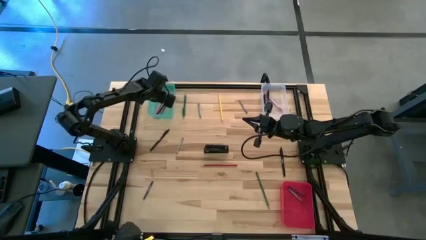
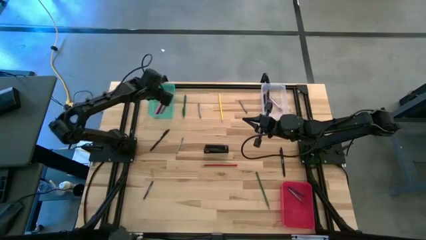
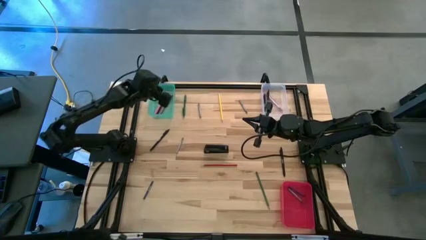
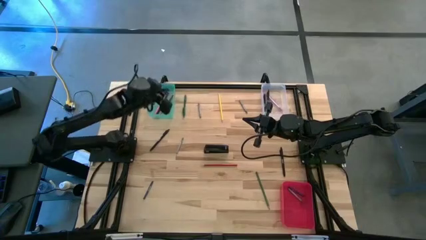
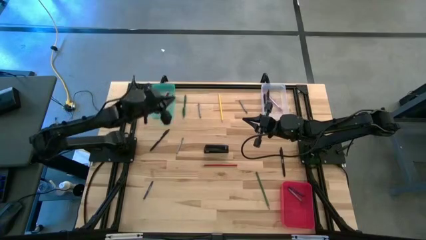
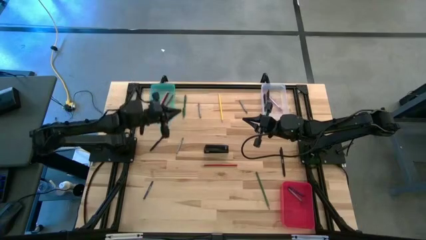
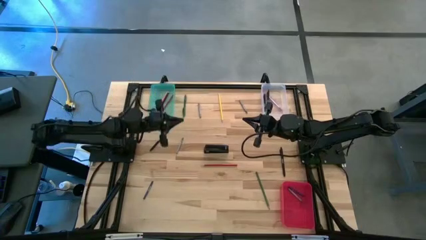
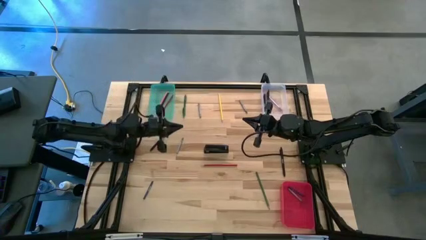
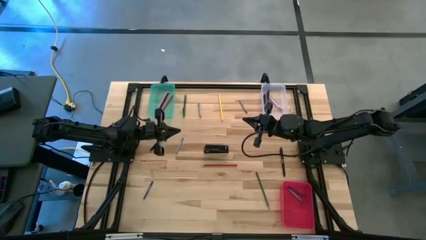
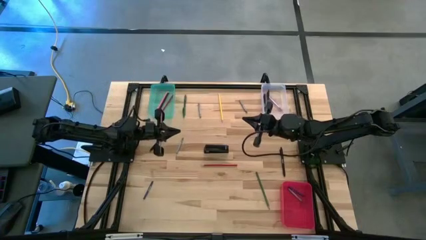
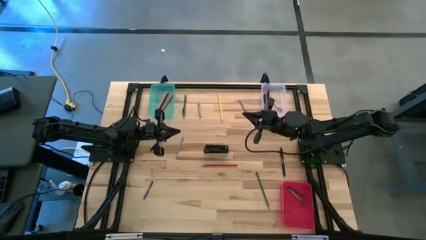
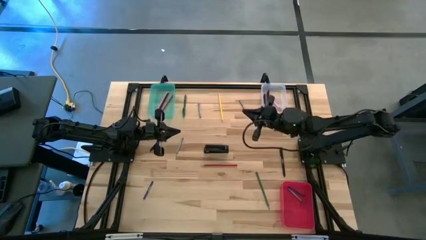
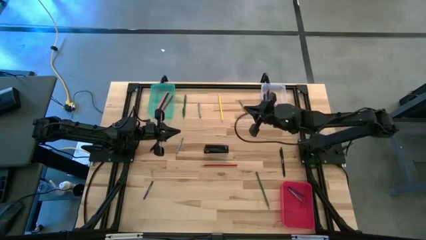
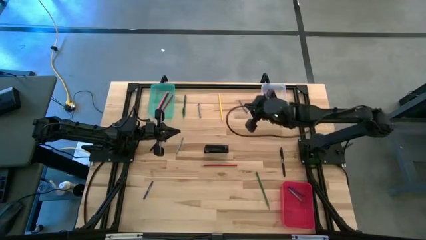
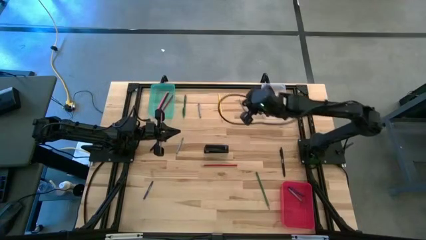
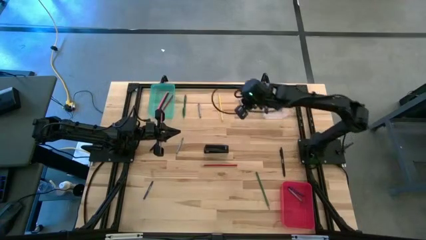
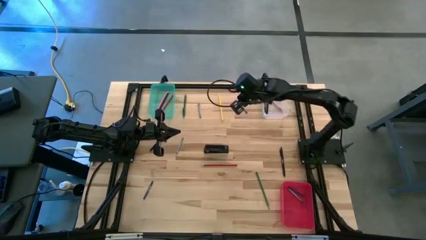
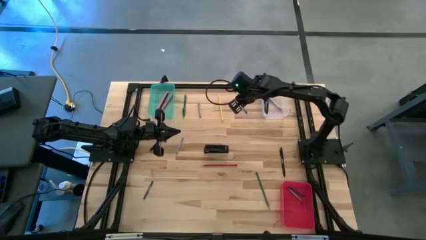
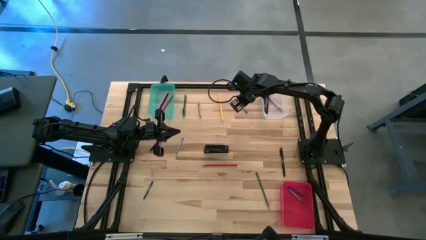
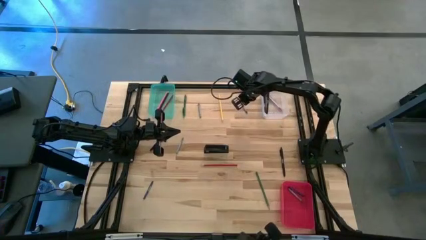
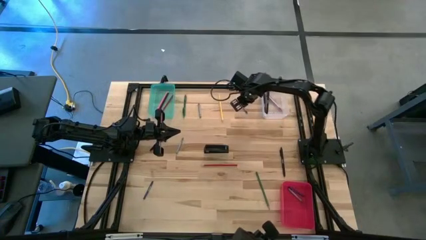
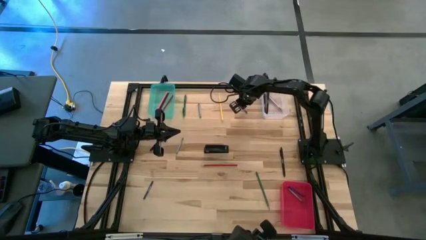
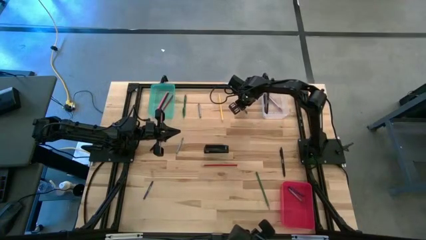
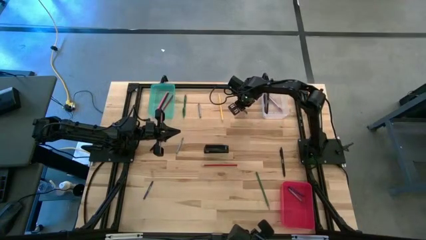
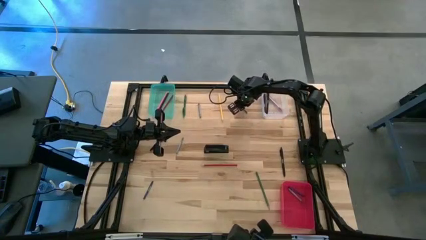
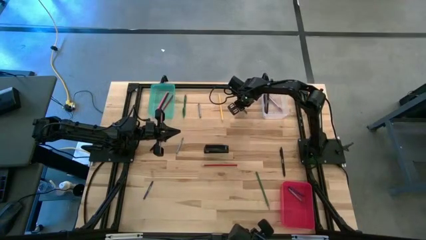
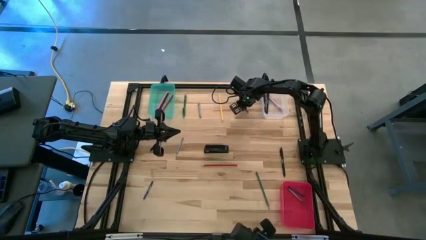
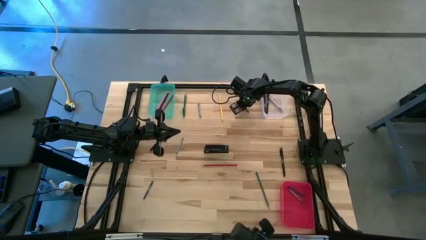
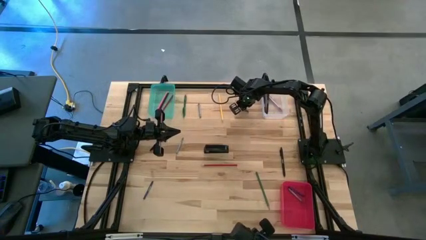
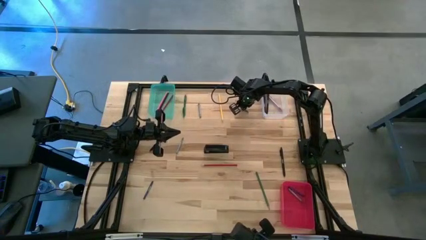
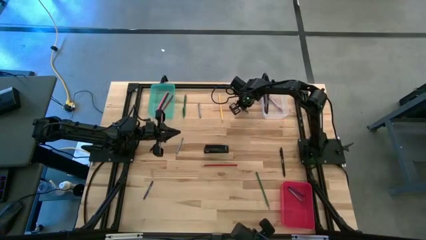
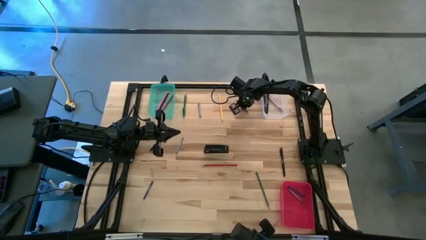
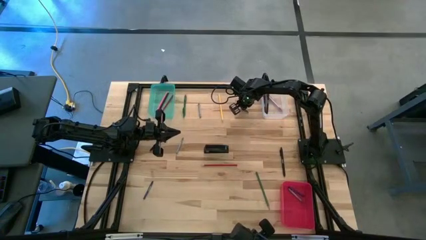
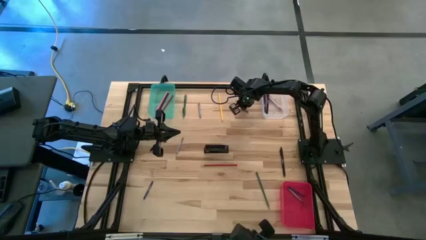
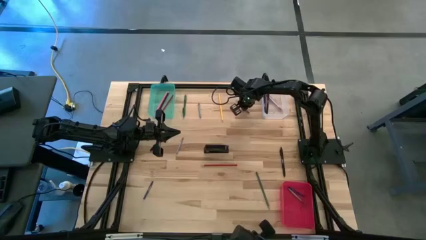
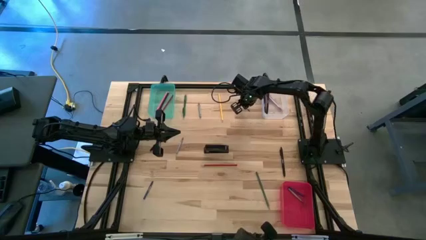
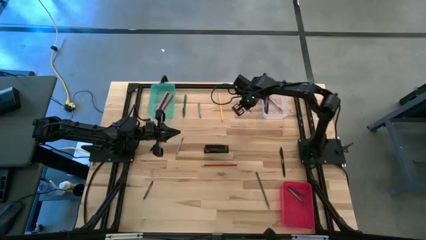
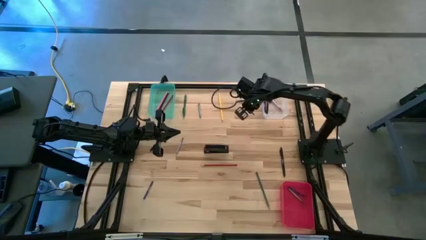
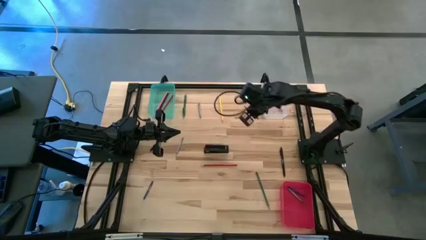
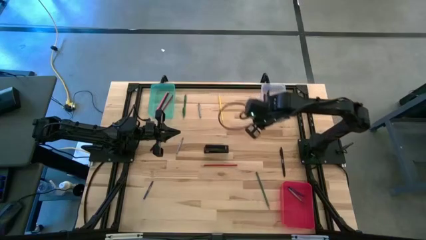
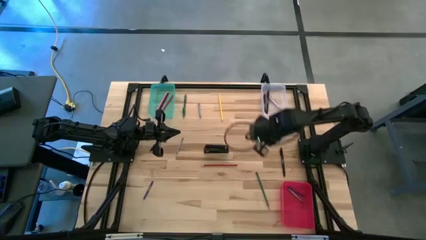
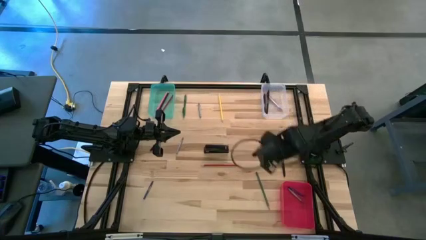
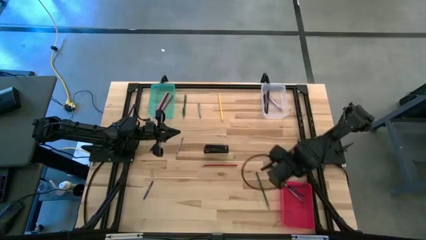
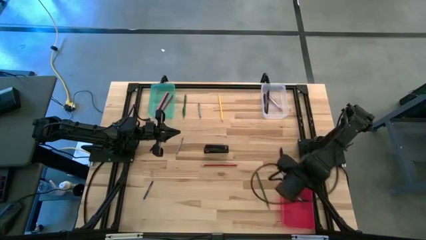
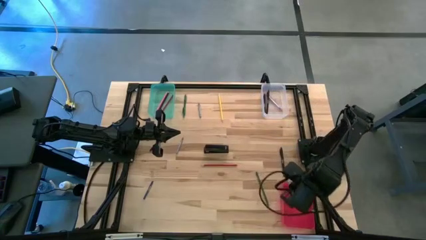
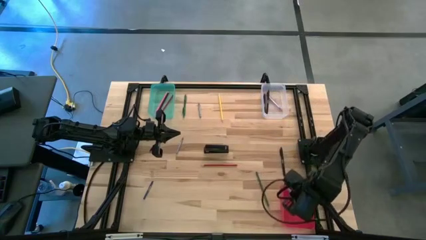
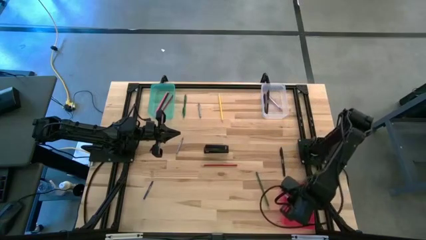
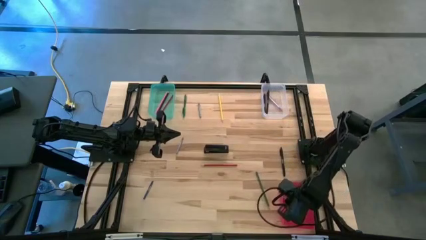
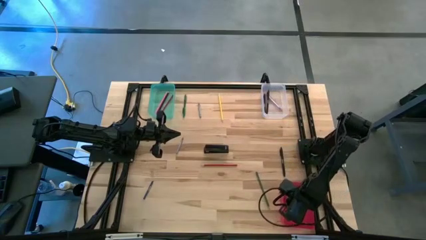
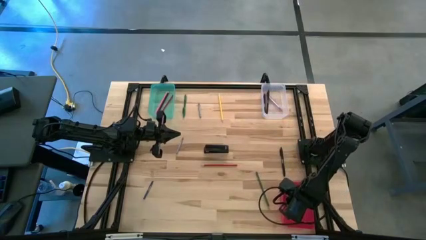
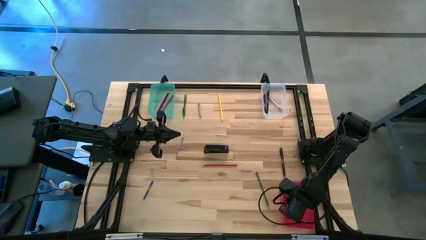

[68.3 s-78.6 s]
Task: Sort crayons/erasers/pens/pencils in bins
Put the gray crayon into the red bin

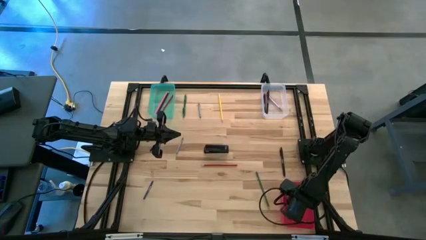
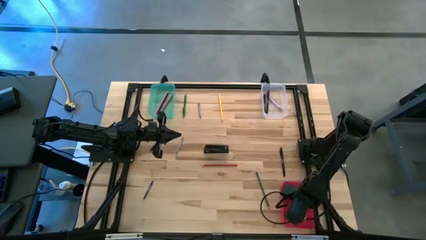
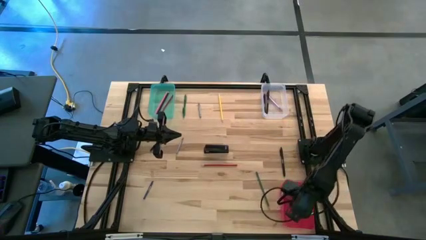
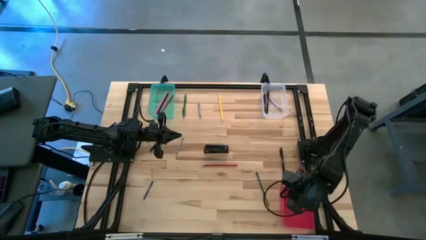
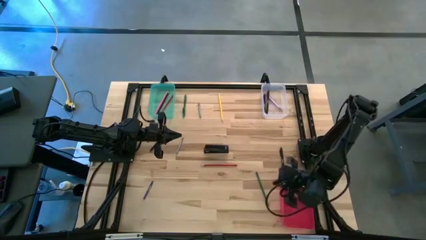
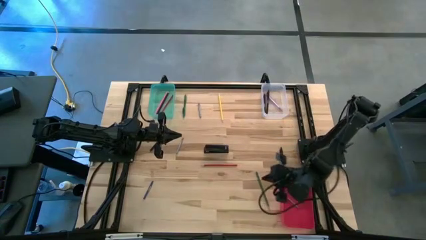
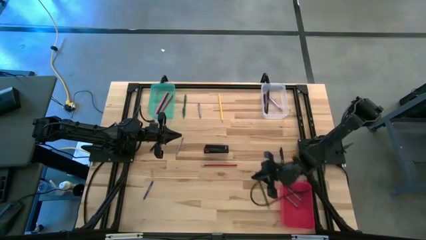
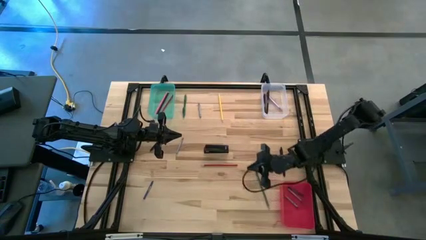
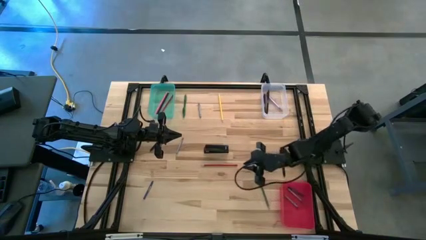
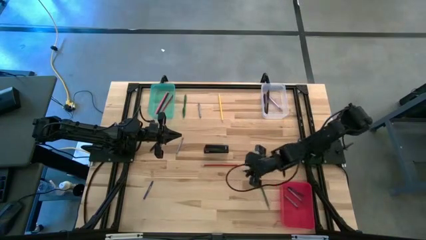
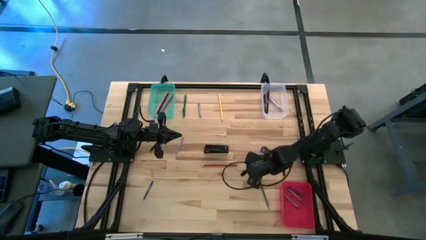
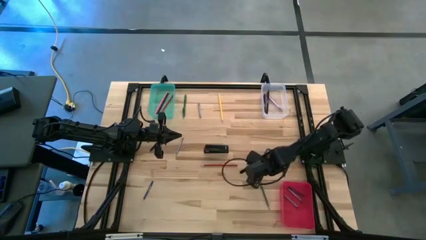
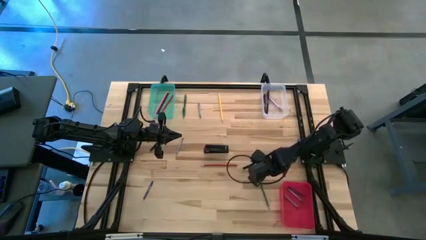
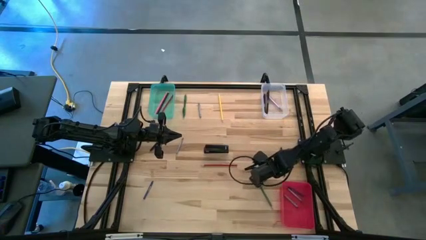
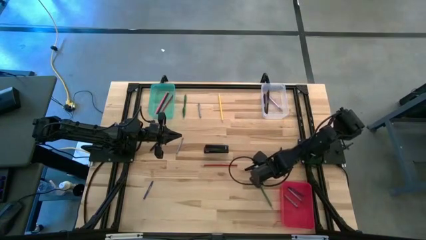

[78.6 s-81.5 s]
Put the green pencil into the green bin

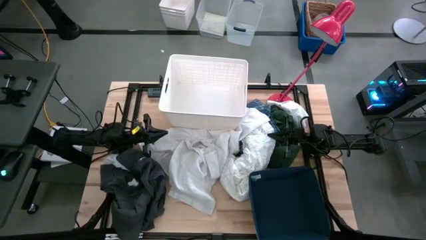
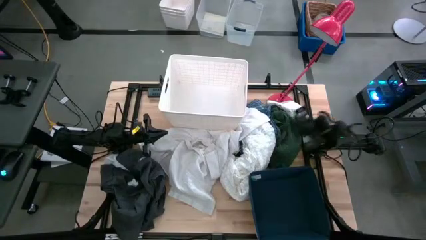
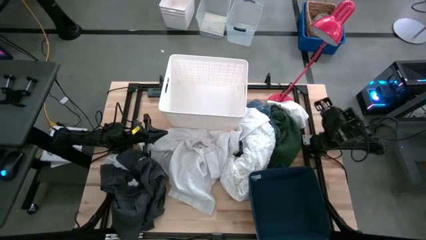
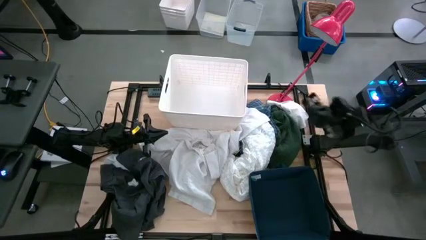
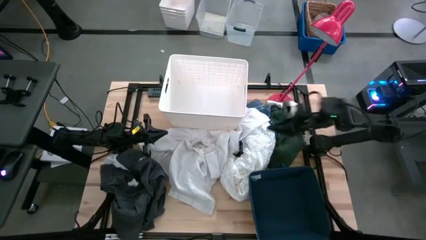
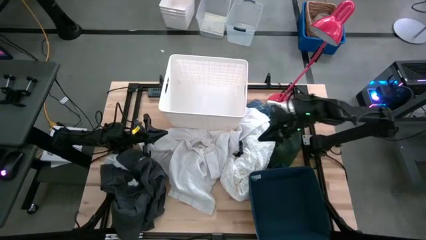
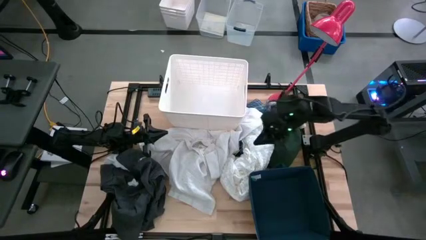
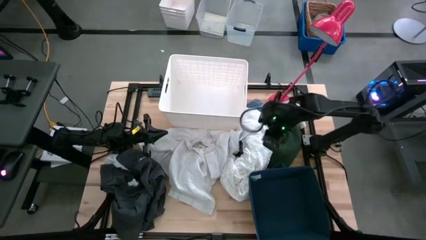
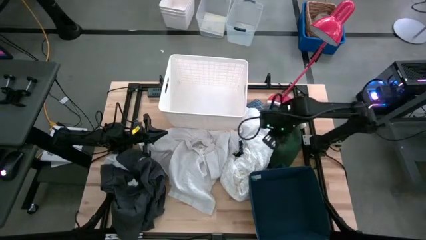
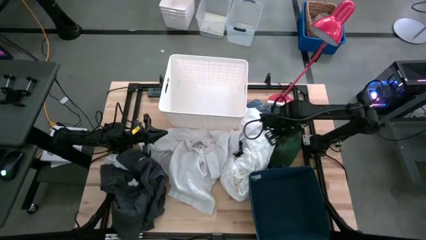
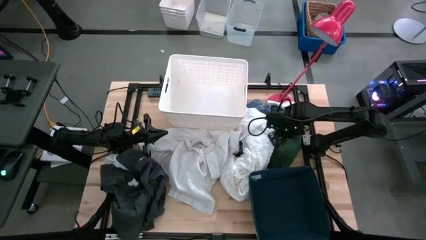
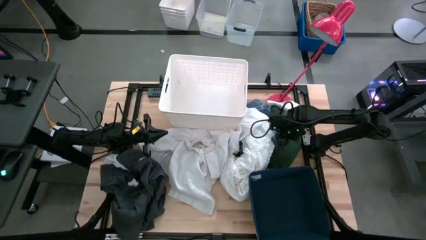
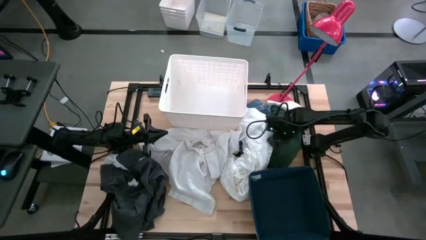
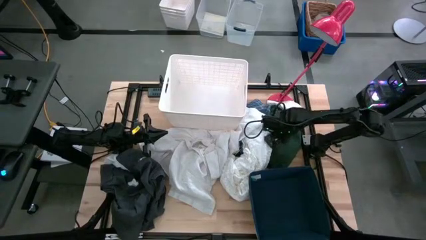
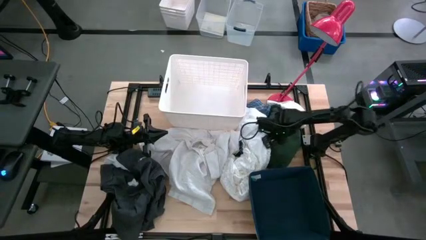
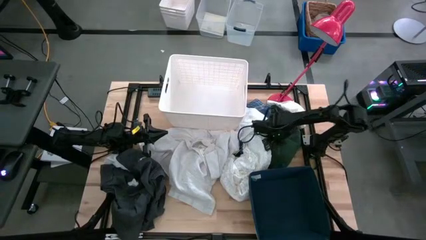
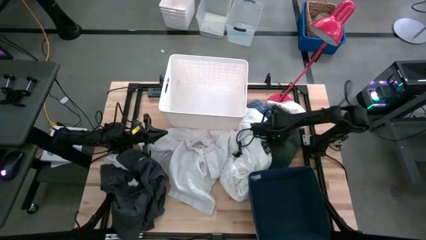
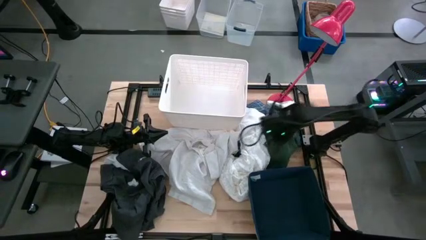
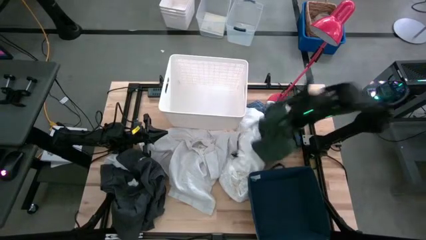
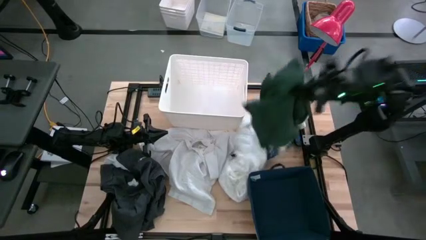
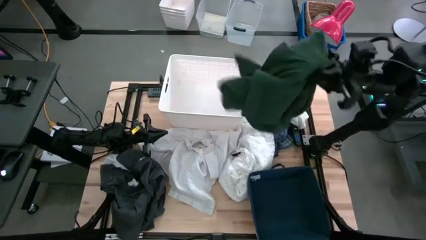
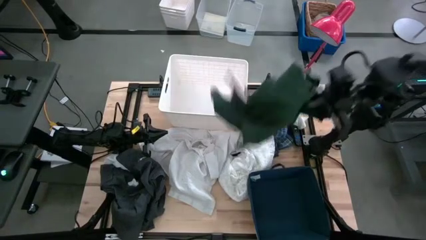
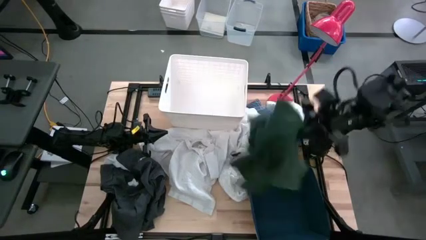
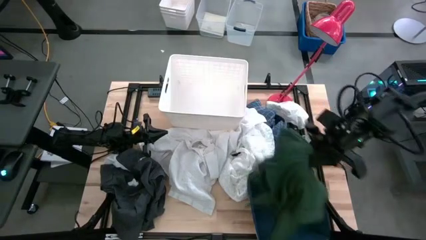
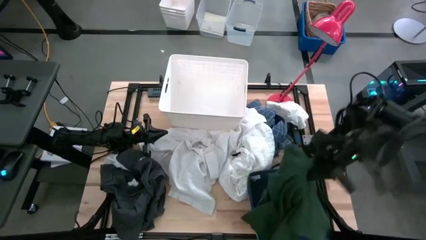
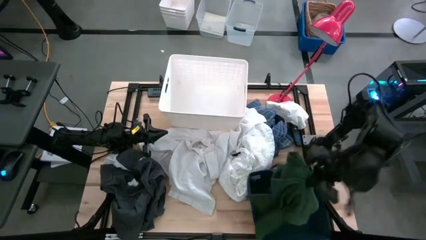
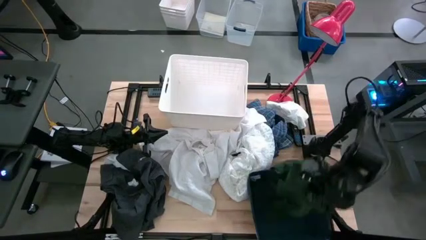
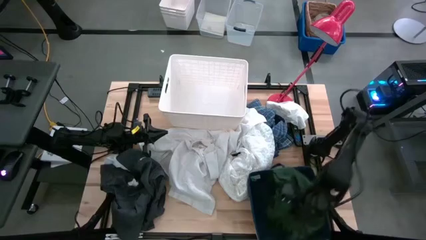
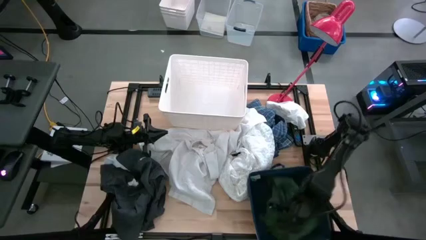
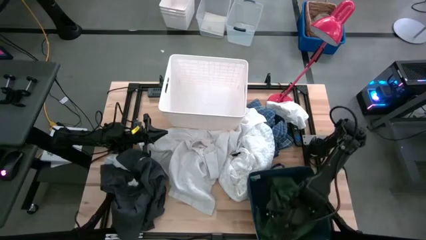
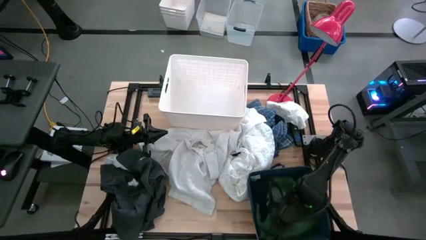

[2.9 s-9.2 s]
Task: Sort clothes
Put the green polo shirt into the blue laundry bin
